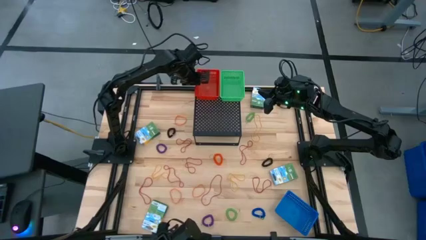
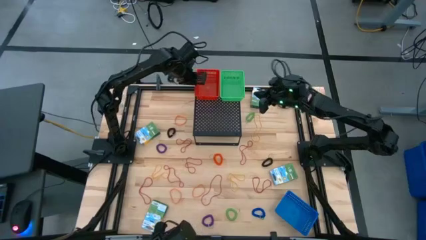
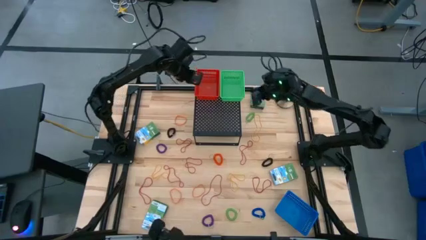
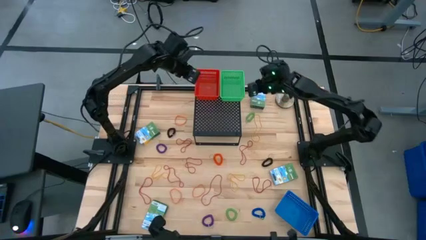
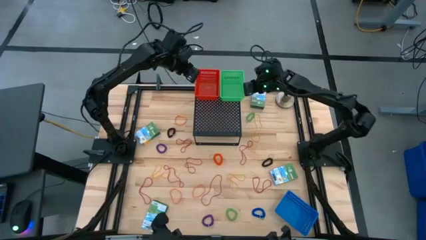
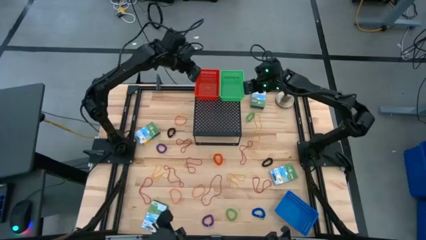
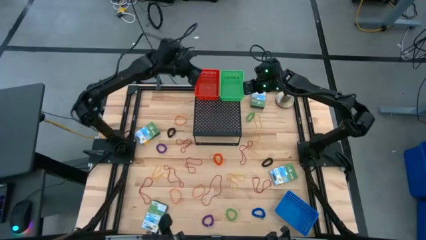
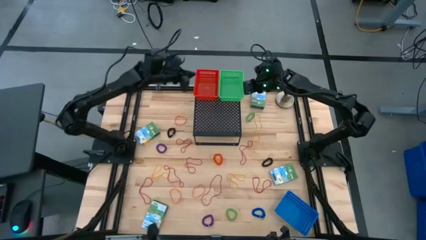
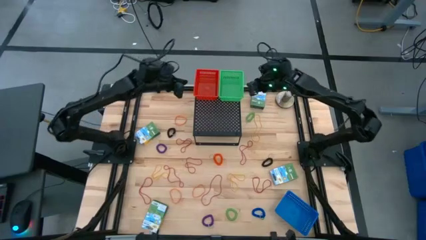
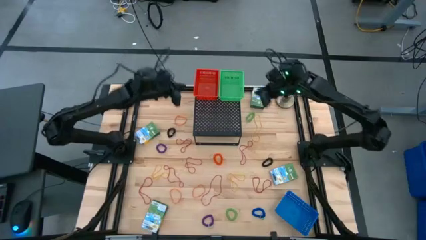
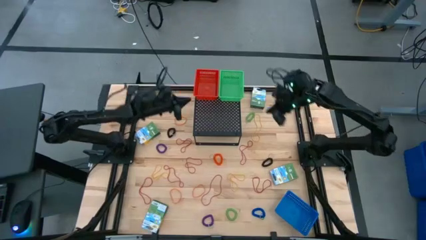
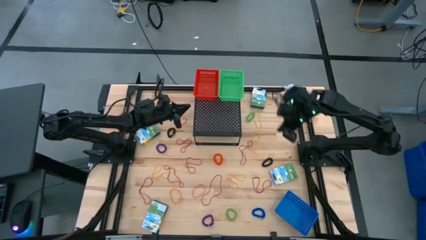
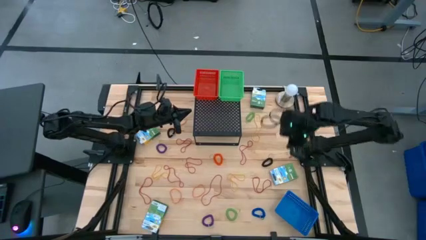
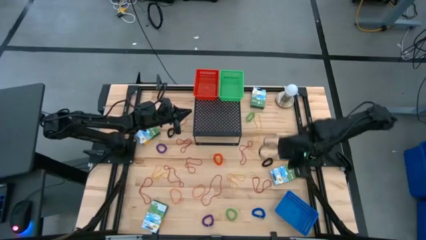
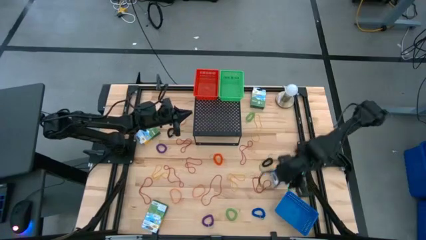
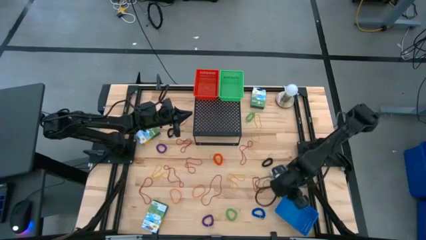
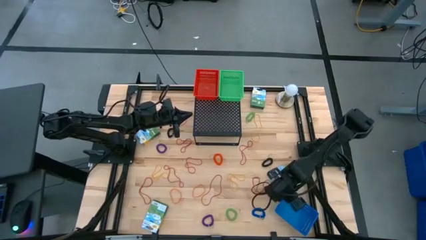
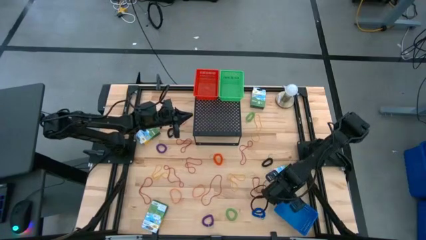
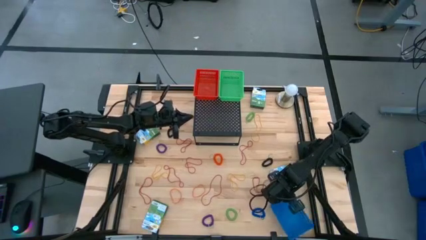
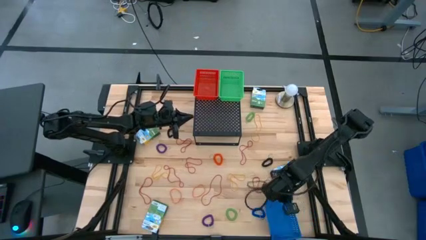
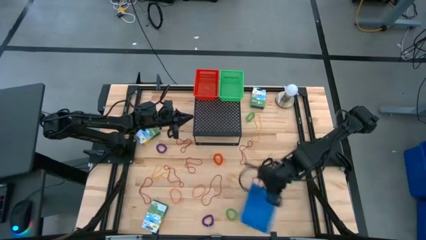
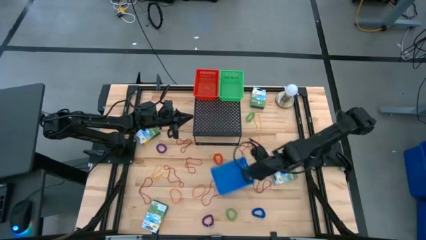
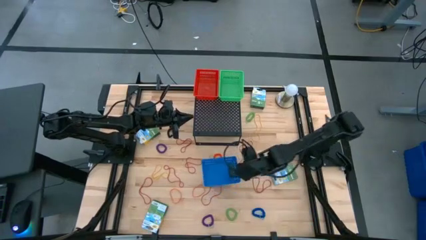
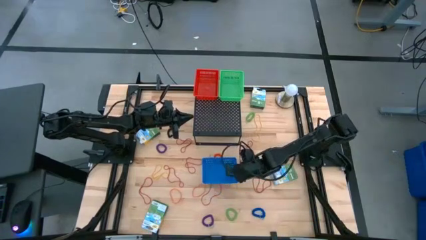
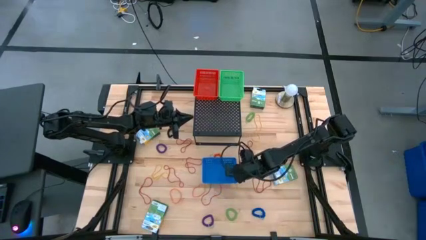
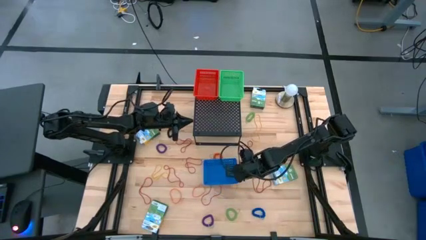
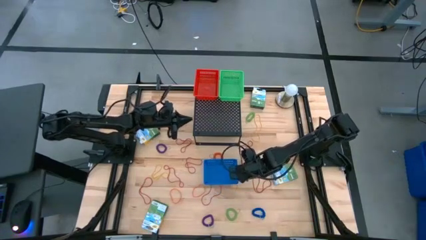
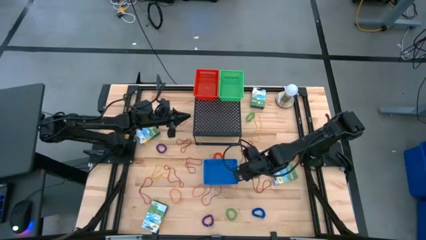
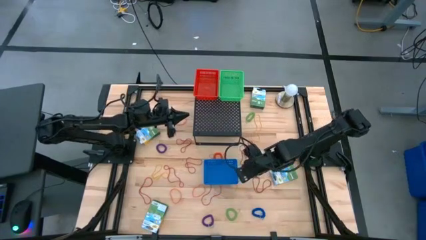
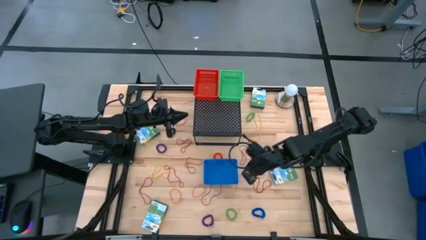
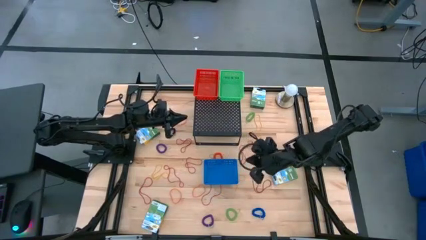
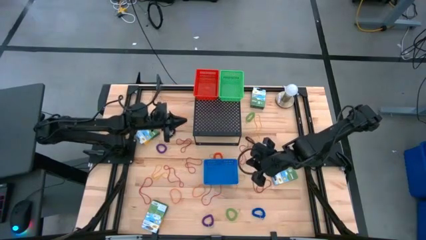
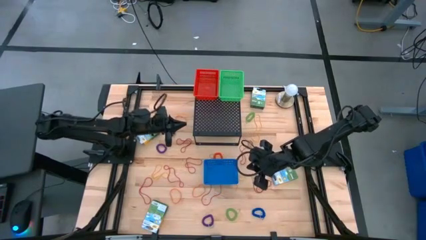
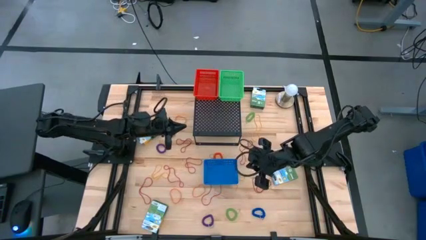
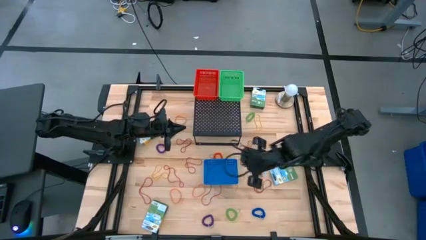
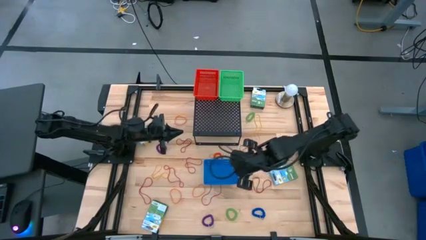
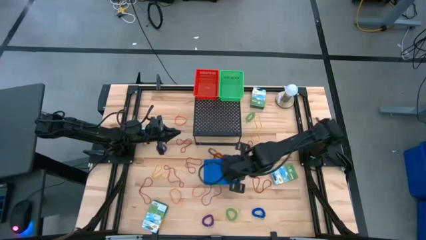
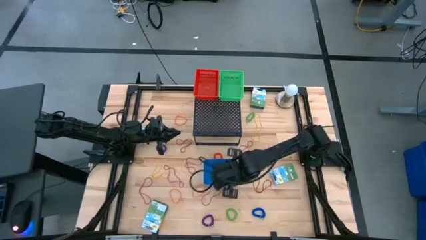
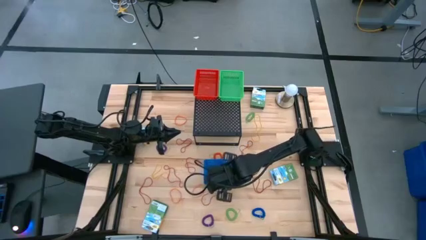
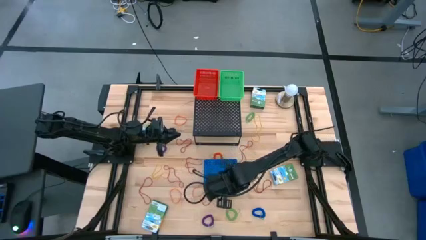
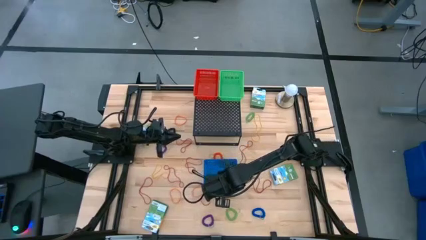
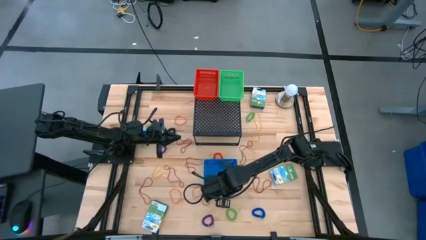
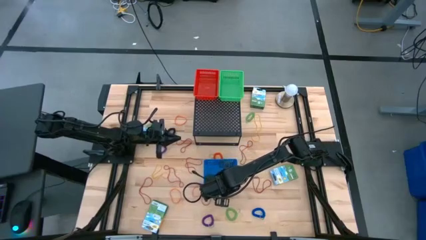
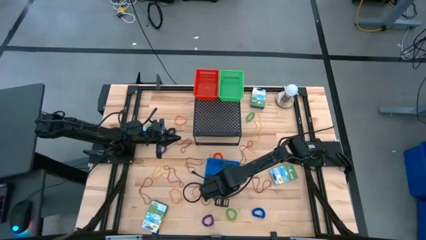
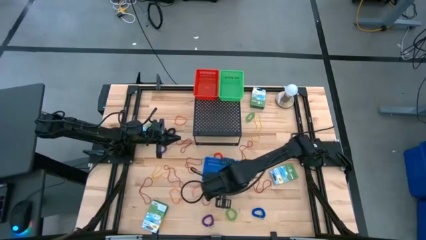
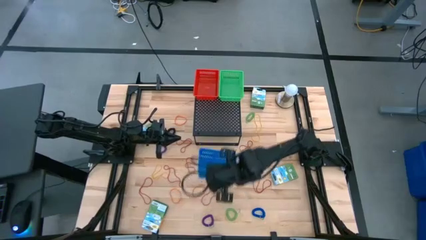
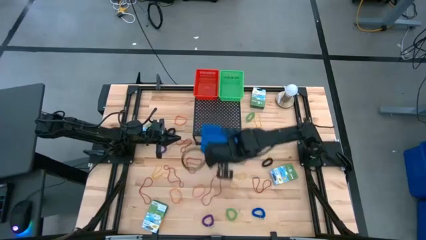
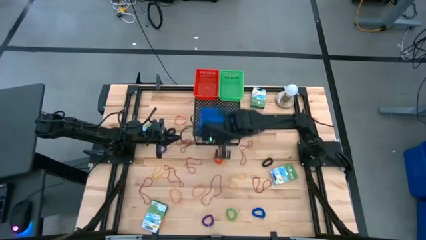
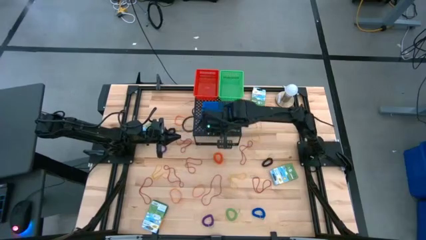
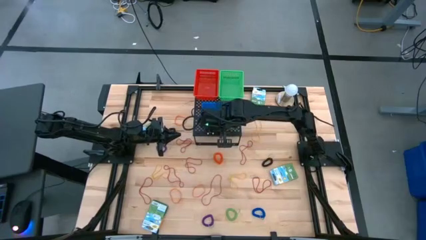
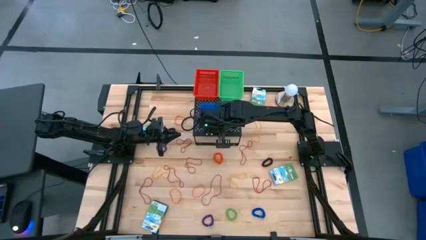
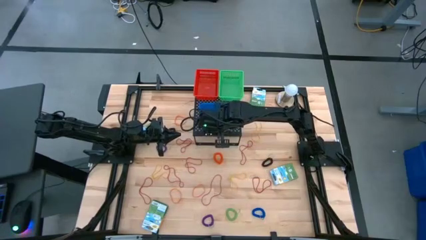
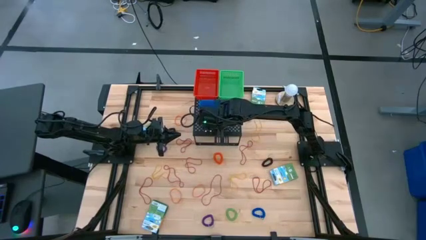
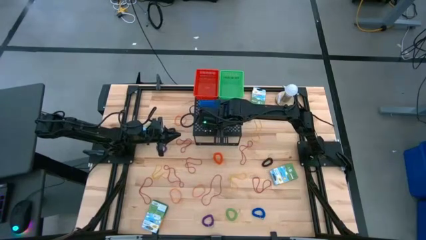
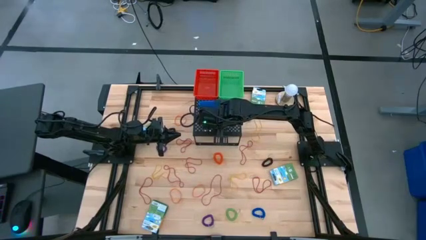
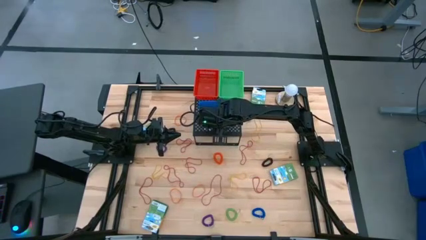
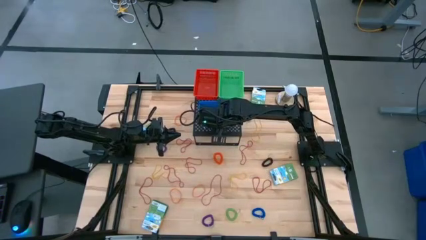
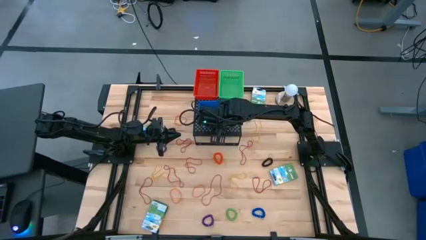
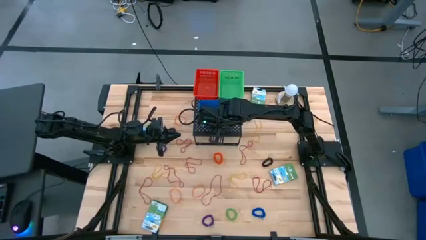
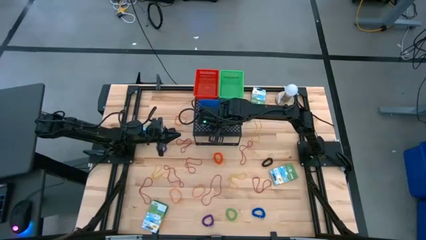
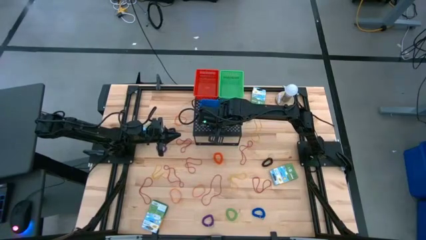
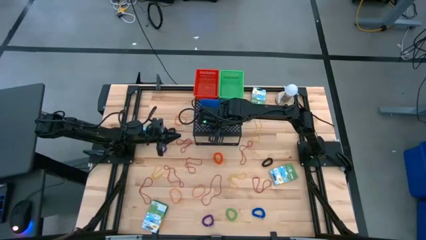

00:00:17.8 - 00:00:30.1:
Task: Pick & Place Office Desk Supplies
Put the blue bin on the shelf

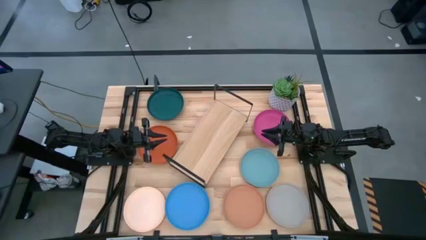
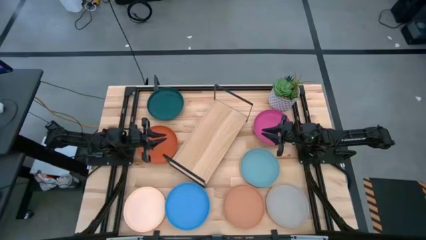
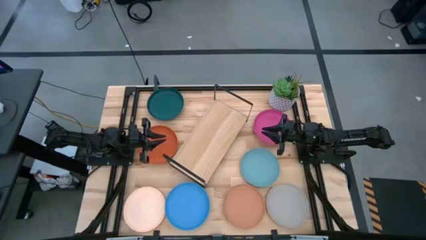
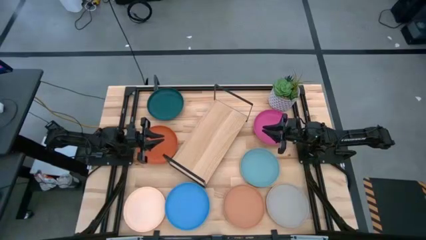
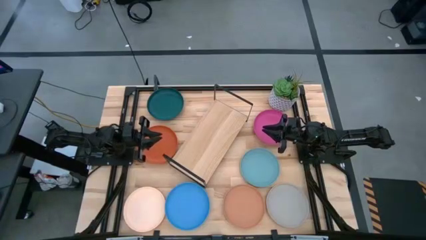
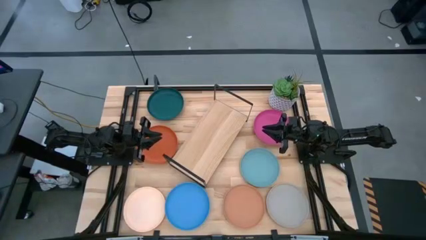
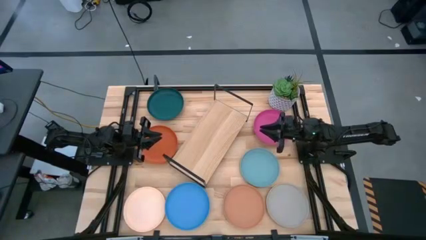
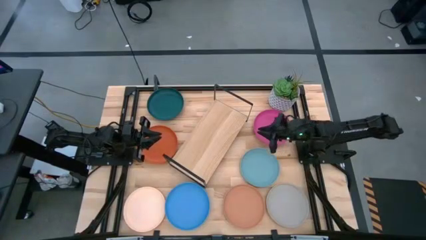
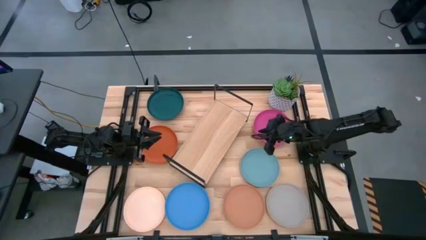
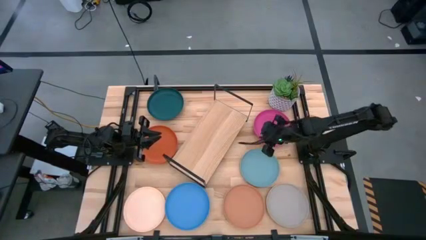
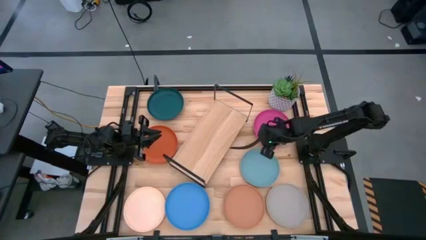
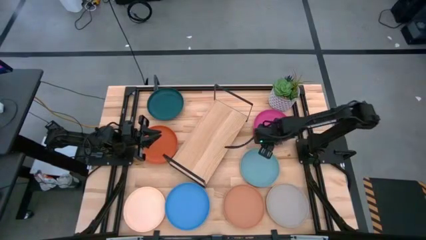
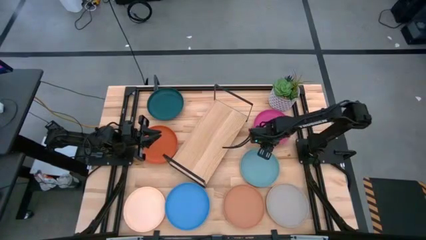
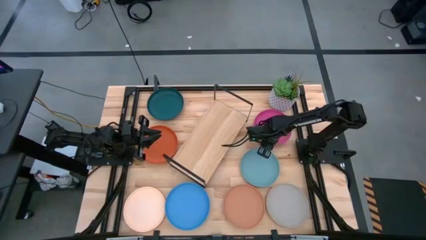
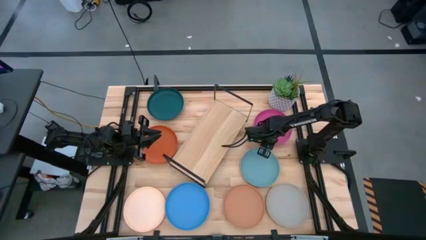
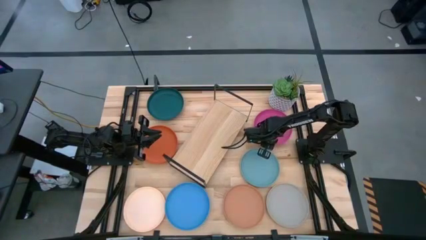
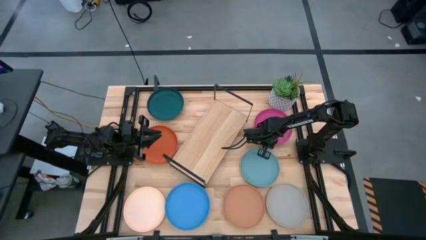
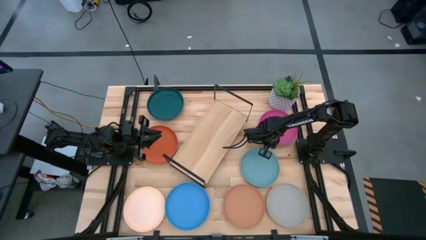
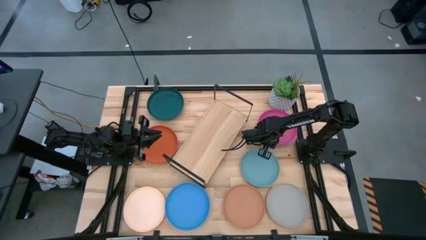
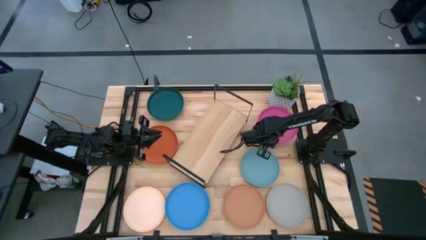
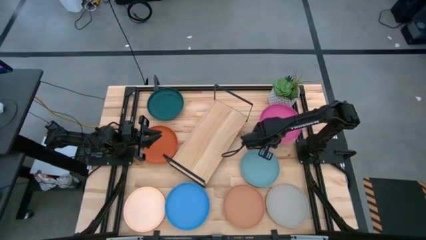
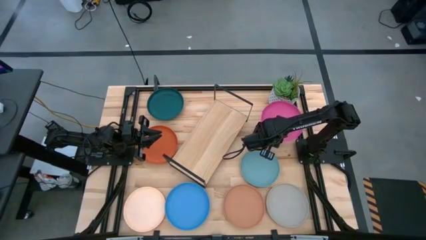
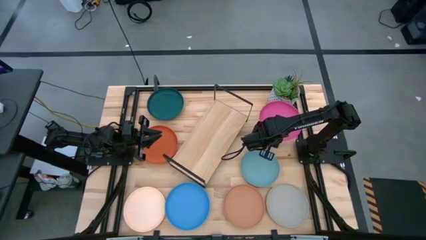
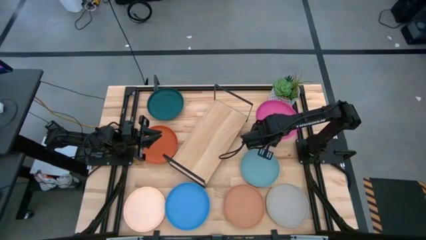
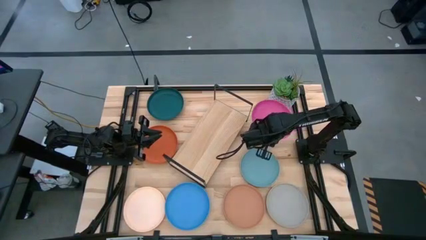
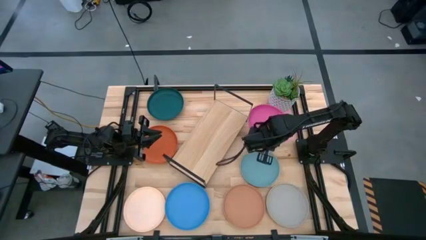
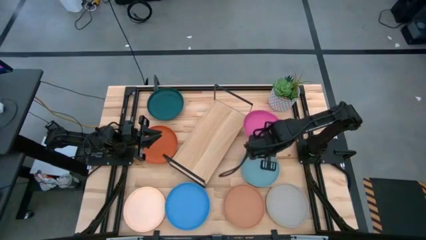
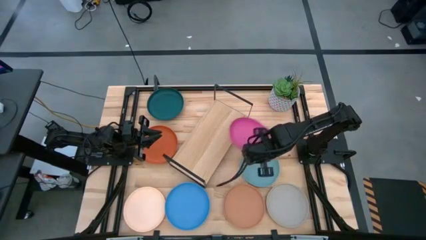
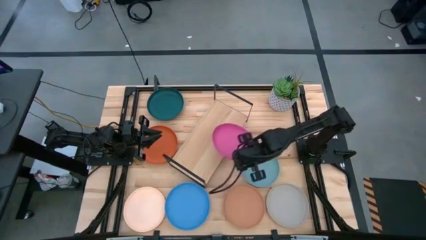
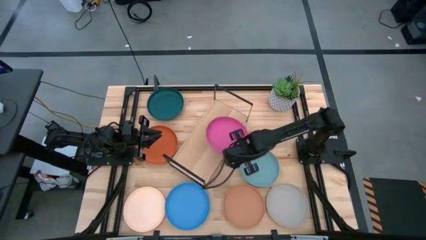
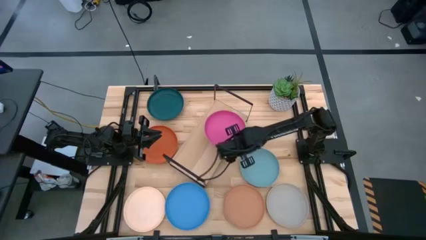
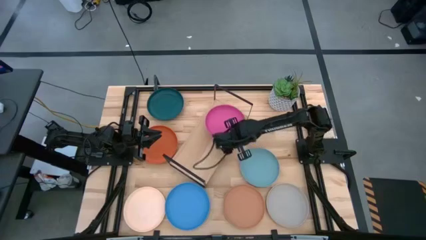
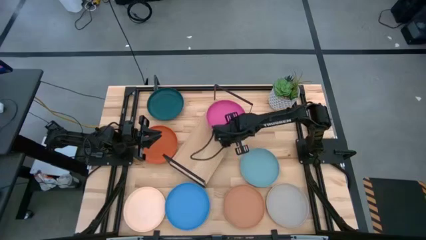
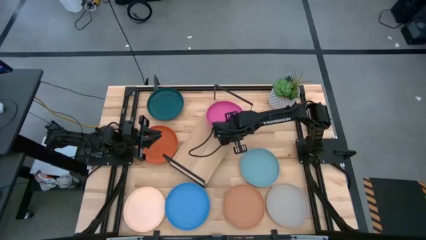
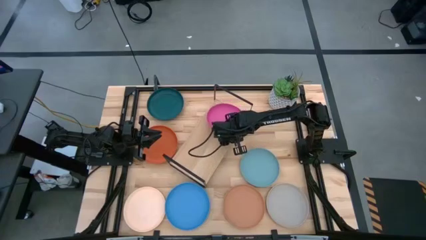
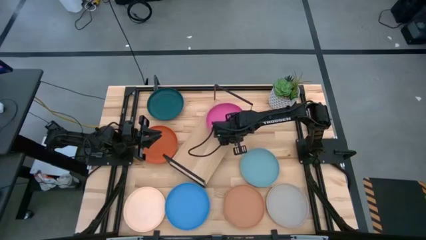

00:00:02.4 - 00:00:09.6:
Task: Place and stack plates onto a shelf
Put the pink plate on the shelf
